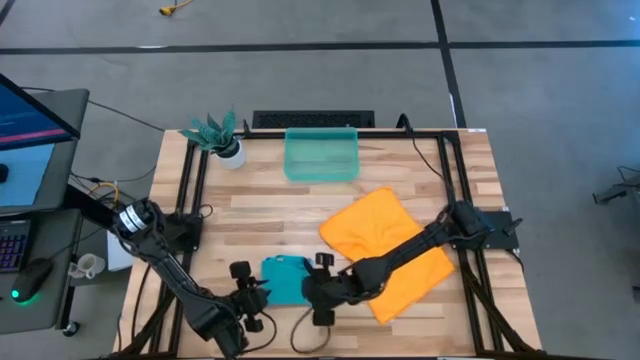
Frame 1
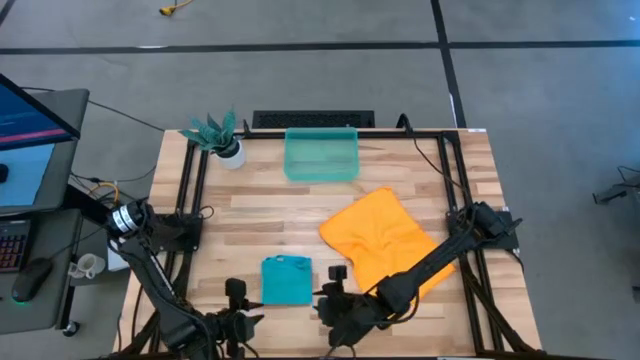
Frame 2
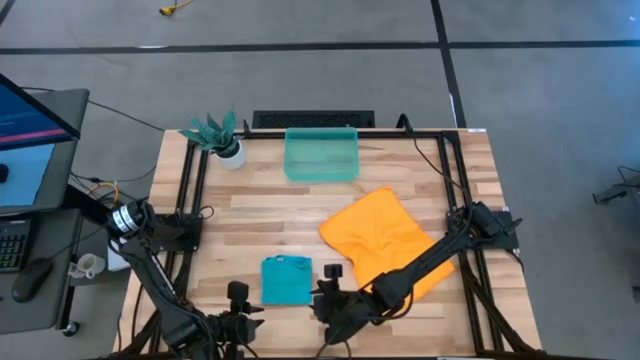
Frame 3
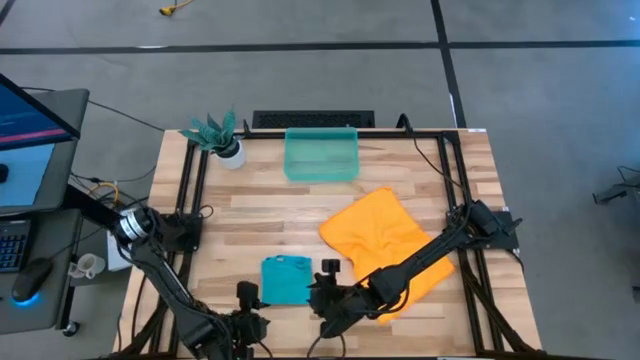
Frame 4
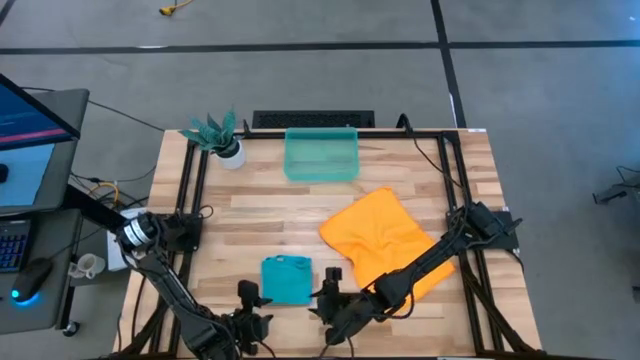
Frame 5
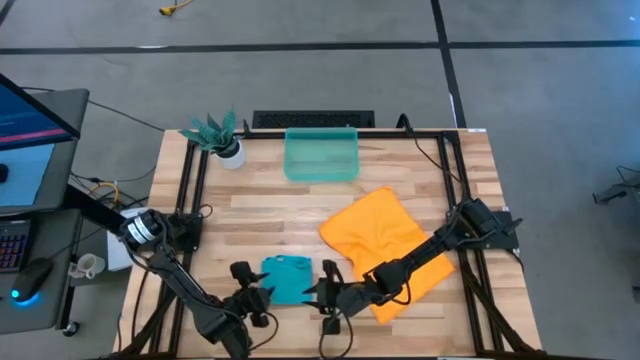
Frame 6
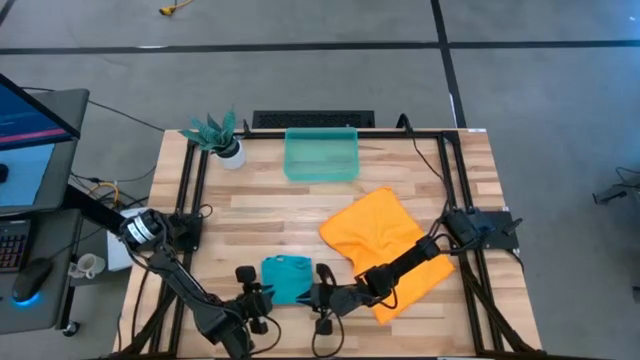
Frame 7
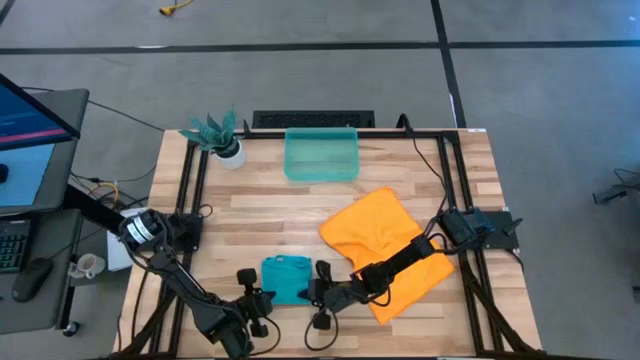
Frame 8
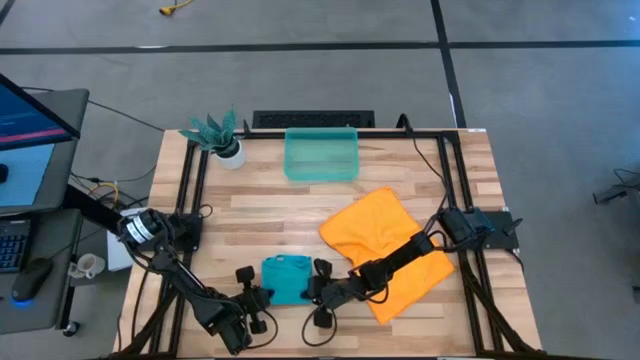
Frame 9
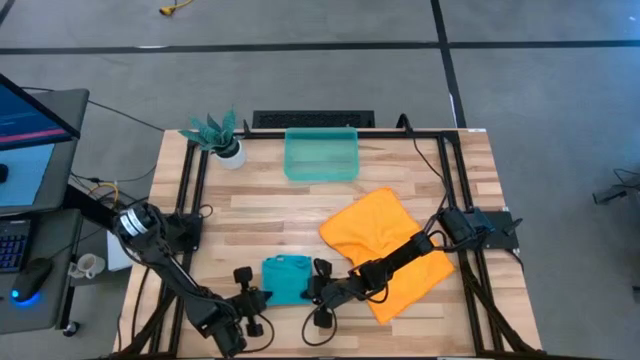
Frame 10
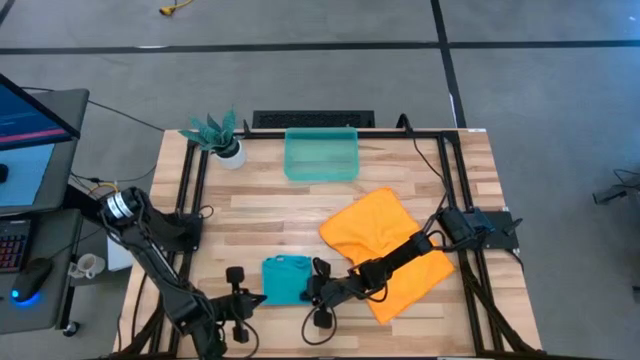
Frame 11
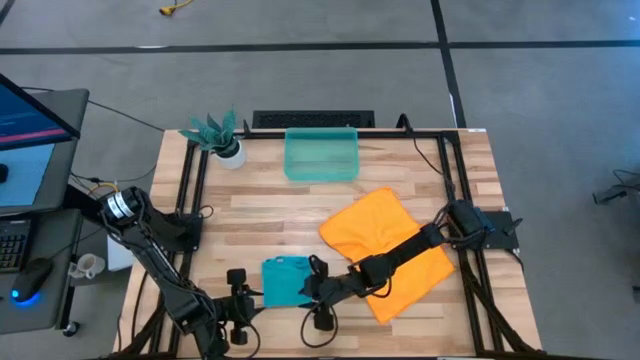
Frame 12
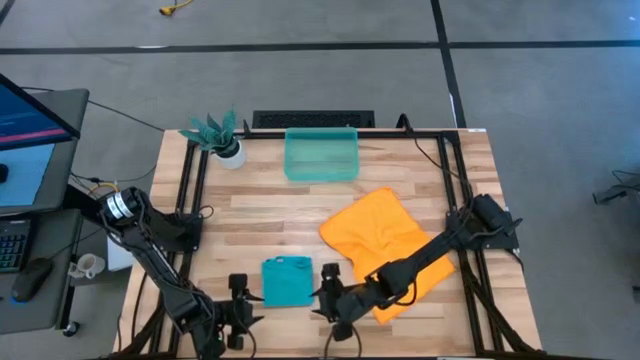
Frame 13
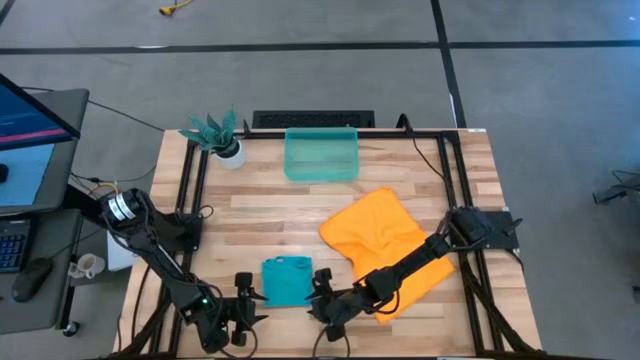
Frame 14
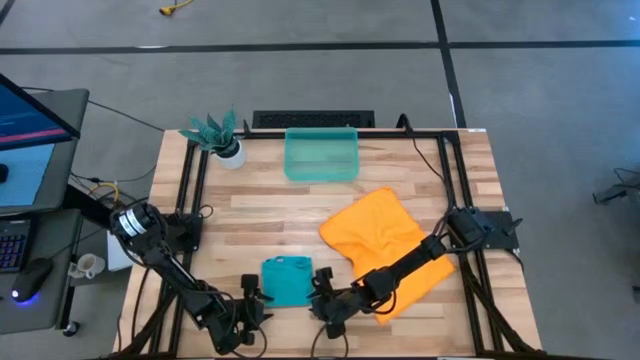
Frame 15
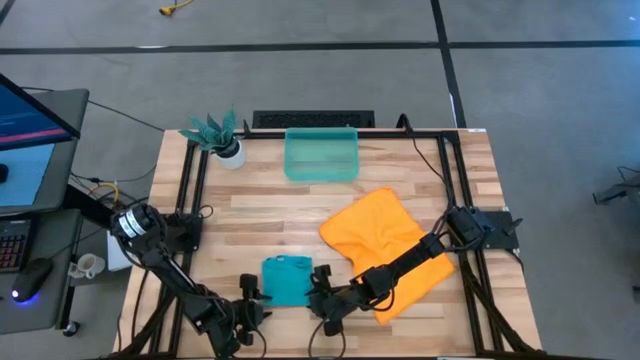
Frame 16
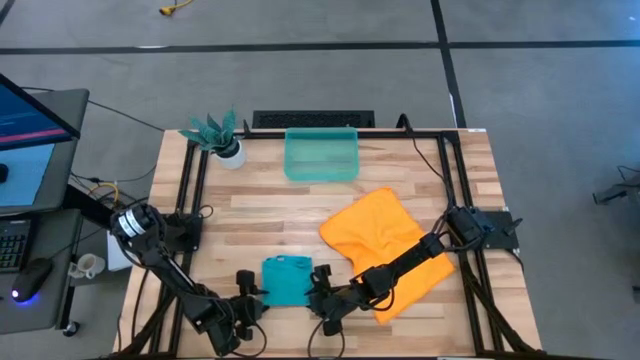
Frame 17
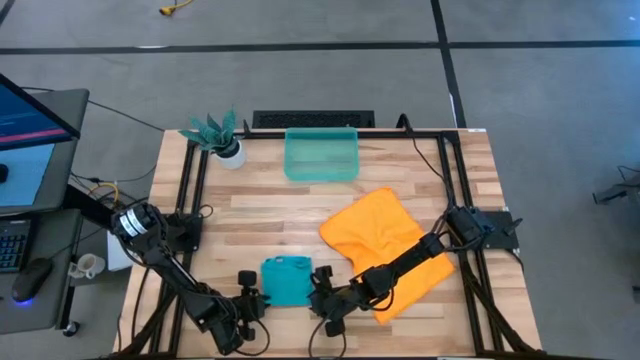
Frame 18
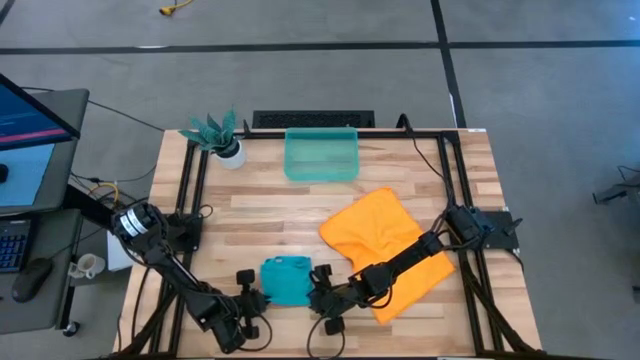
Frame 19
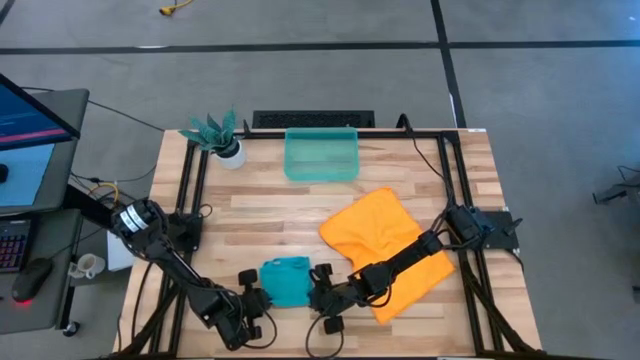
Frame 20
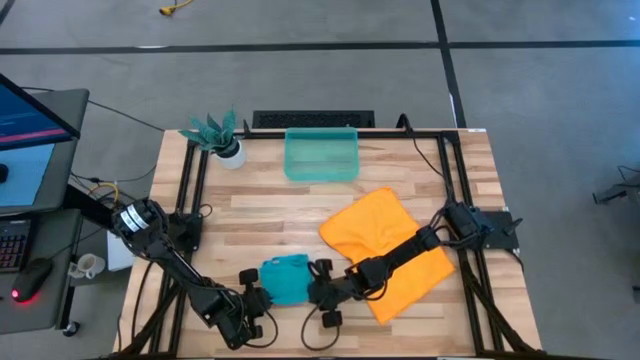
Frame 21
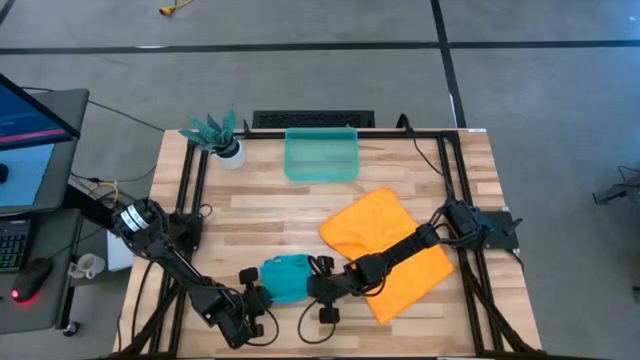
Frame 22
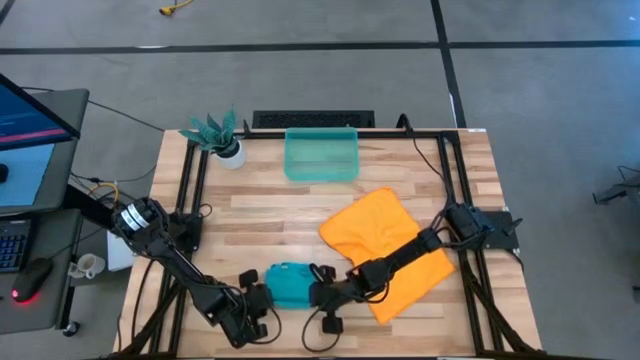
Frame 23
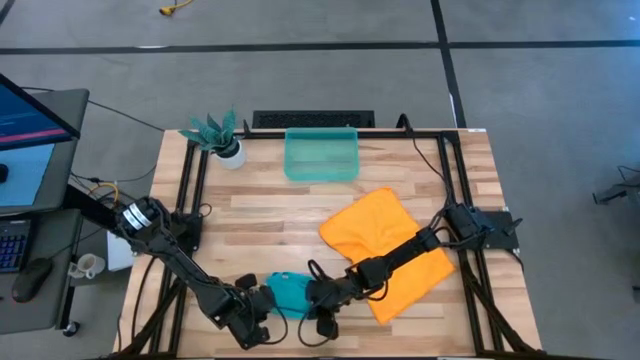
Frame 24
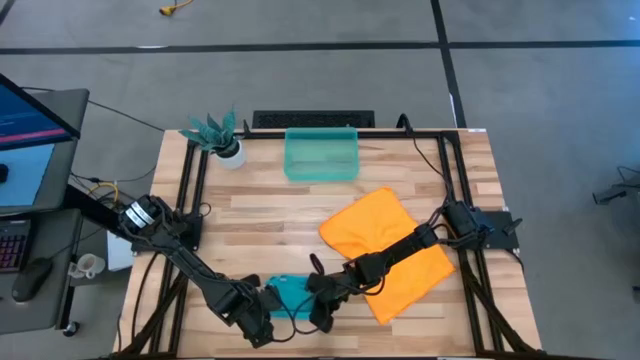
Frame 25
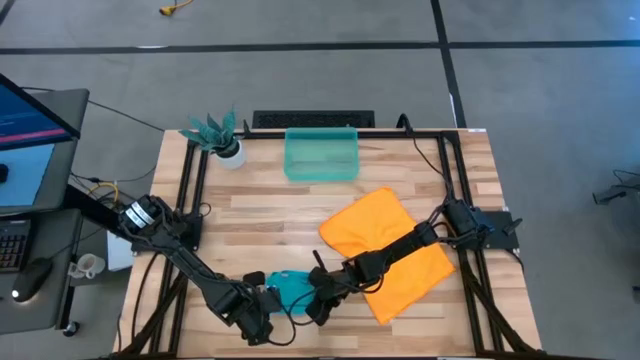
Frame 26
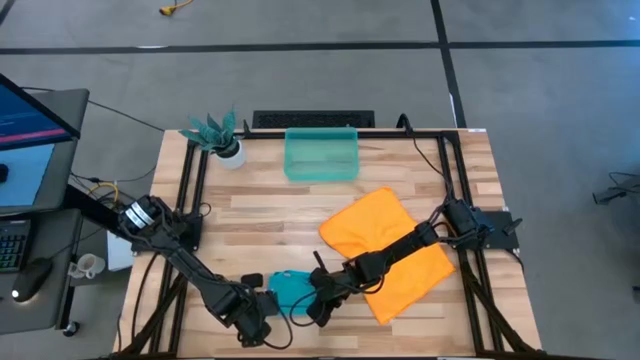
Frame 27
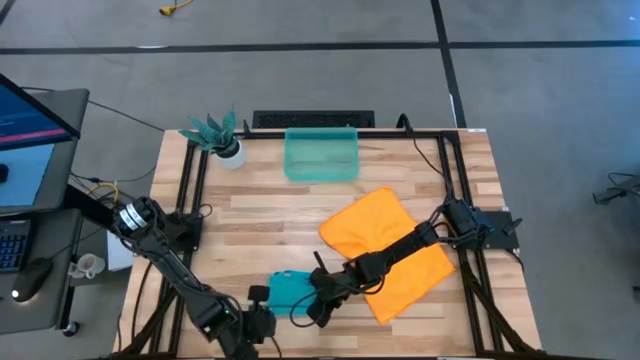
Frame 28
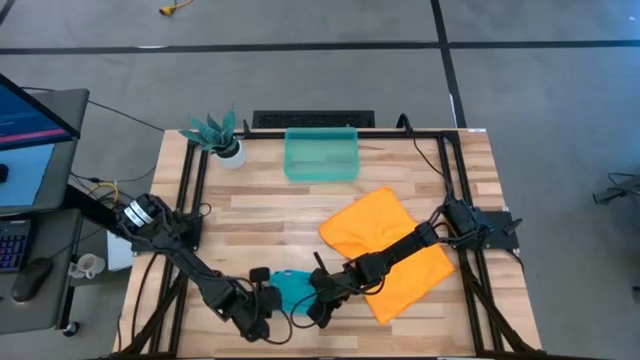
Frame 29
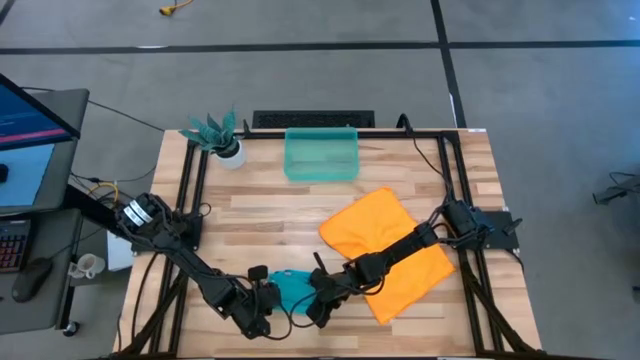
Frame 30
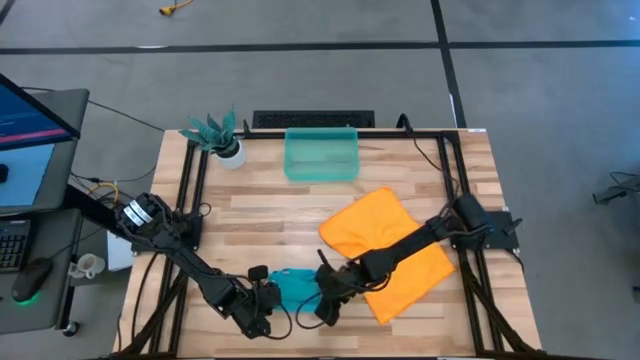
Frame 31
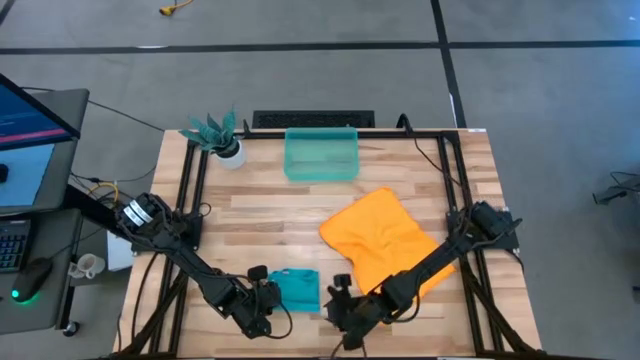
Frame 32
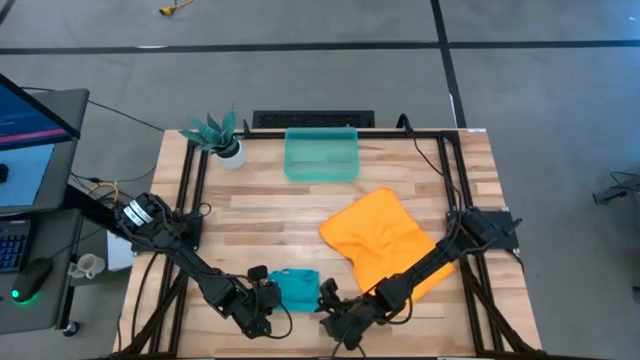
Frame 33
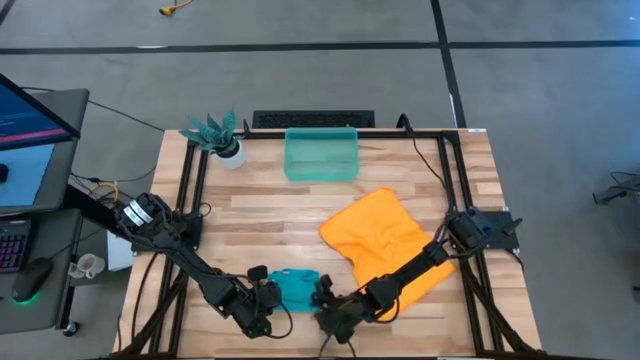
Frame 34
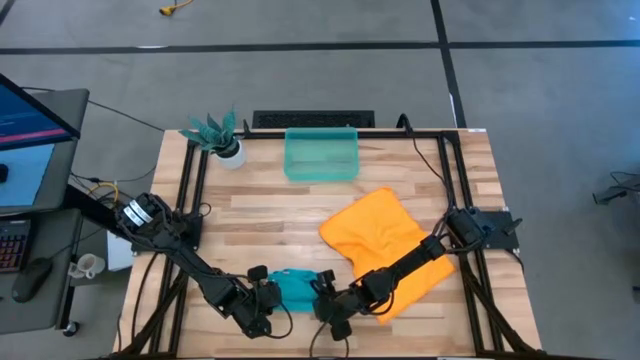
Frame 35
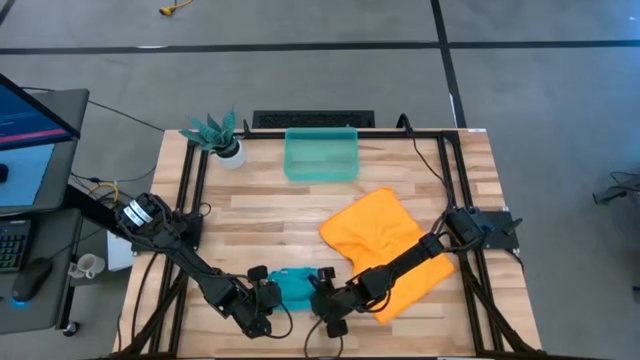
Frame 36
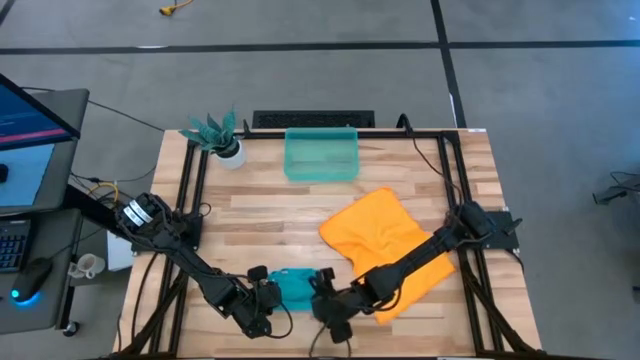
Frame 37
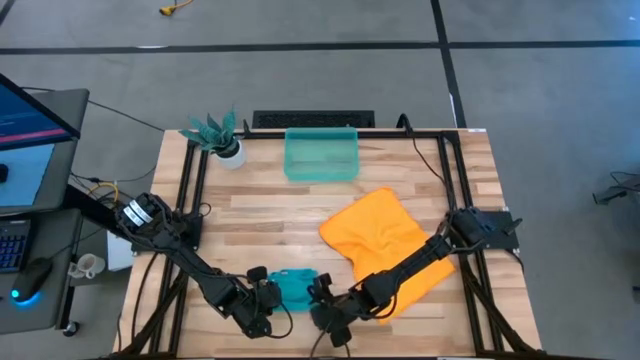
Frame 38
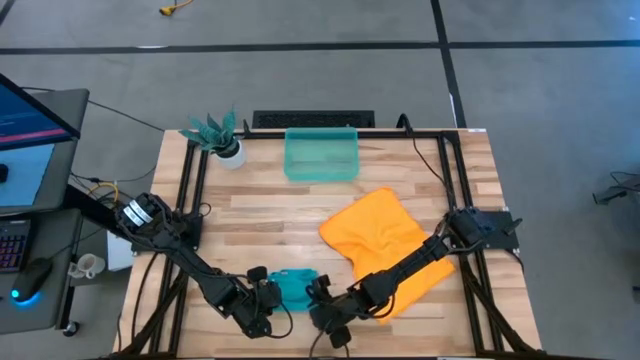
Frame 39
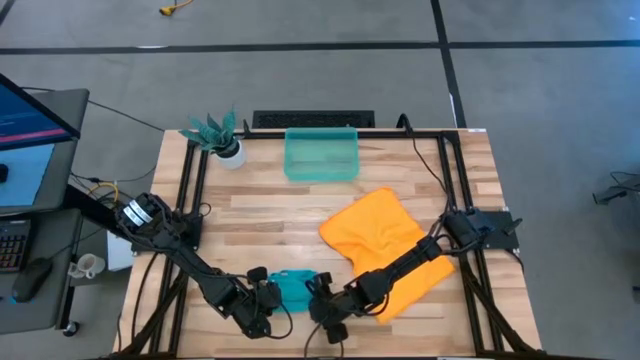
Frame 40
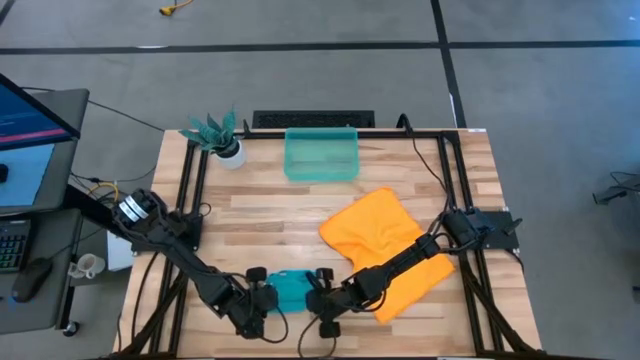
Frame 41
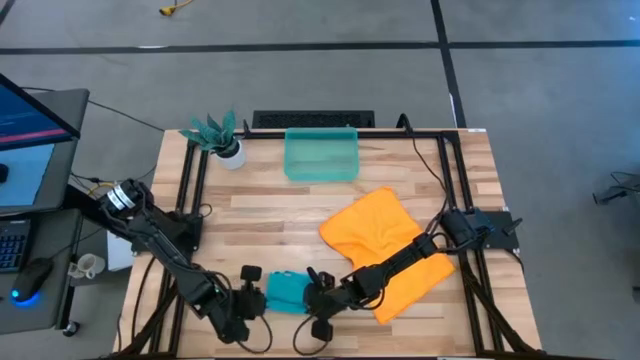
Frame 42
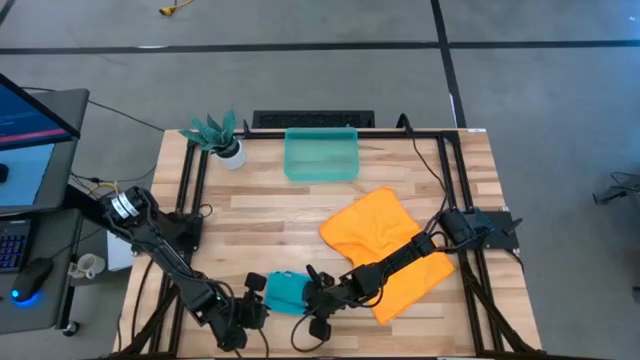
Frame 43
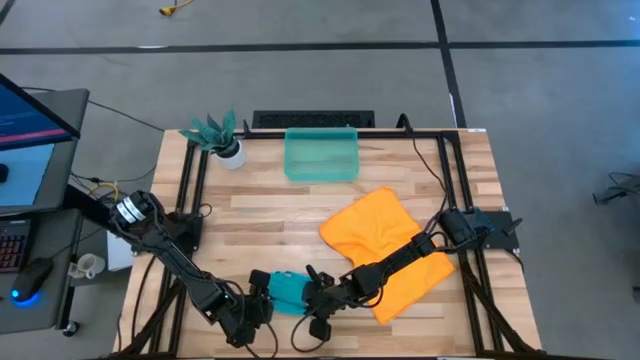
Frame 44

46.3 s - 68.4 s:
Task: Roll microfiber towels into tight, uniform cylinder then place into a basket
Roll the blue microfiber cloth
